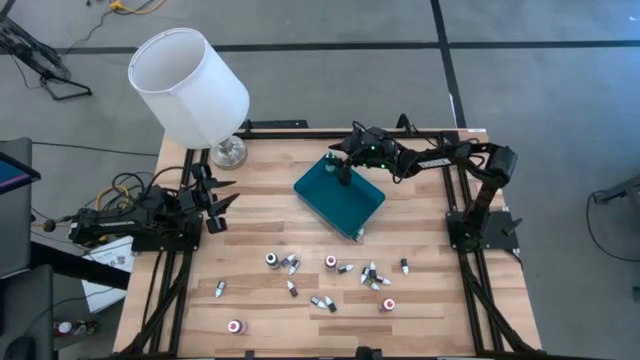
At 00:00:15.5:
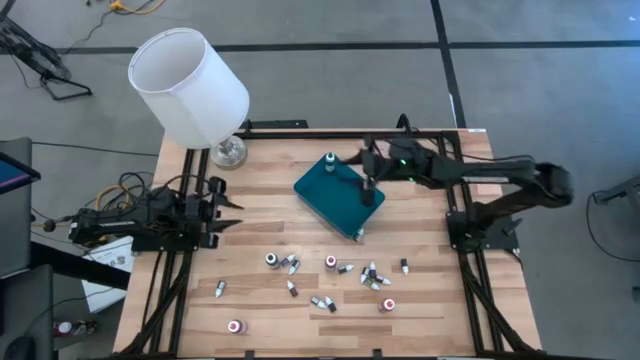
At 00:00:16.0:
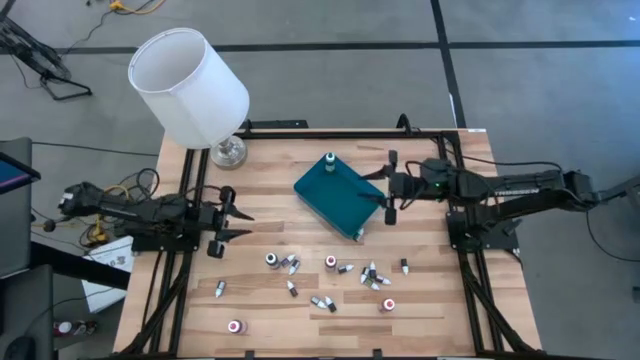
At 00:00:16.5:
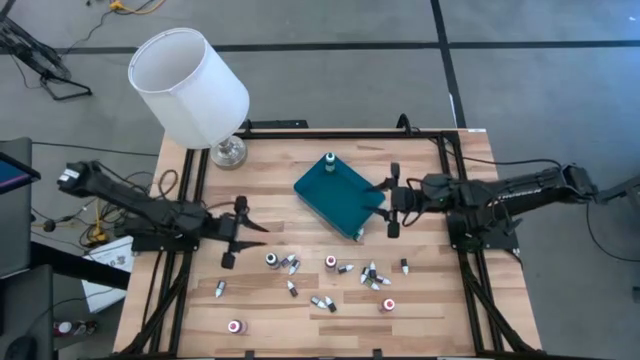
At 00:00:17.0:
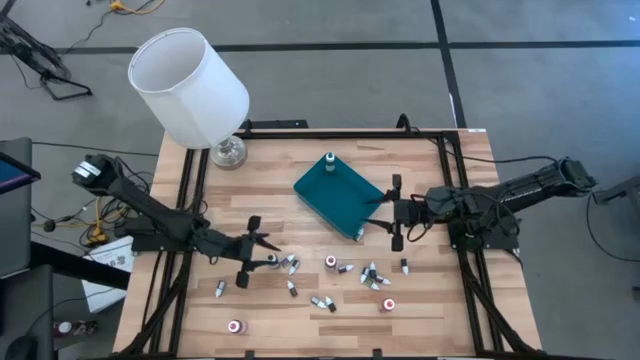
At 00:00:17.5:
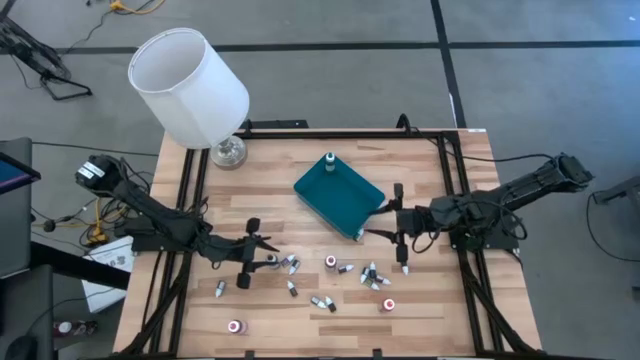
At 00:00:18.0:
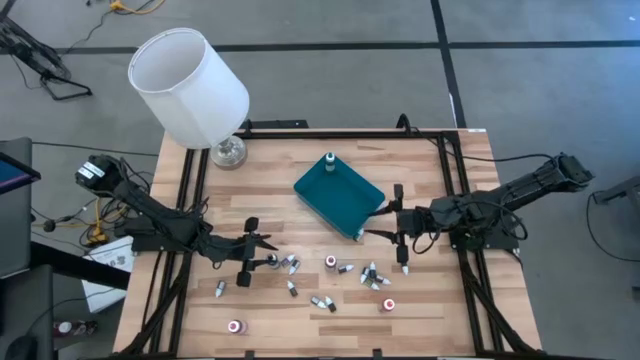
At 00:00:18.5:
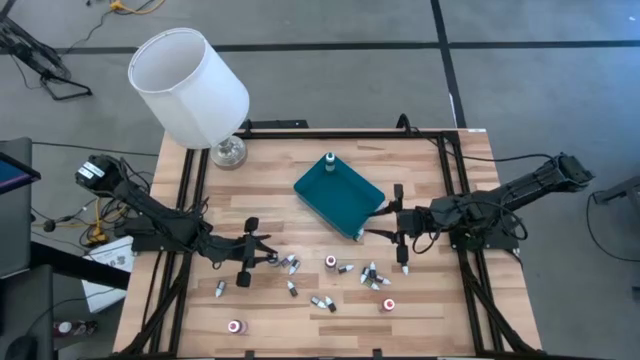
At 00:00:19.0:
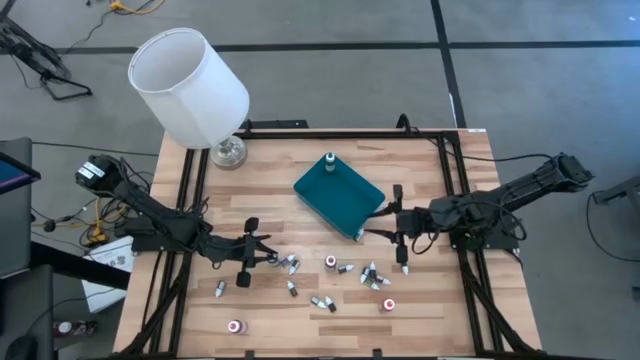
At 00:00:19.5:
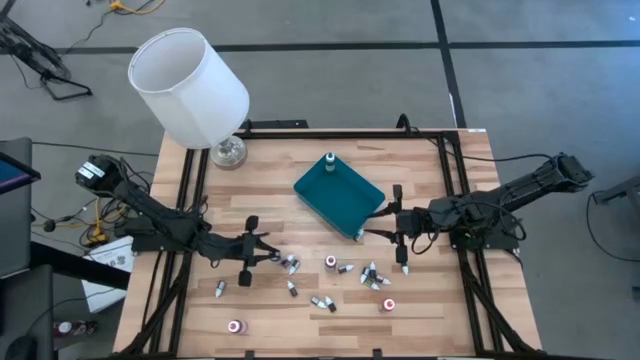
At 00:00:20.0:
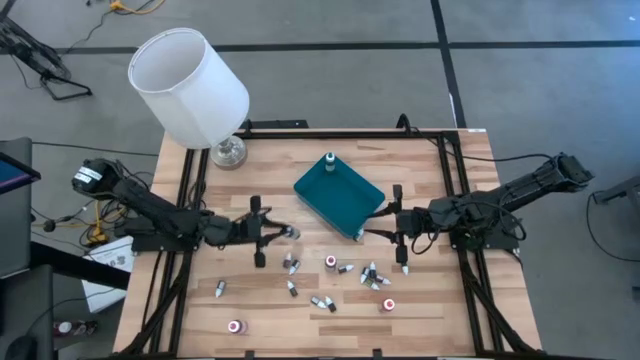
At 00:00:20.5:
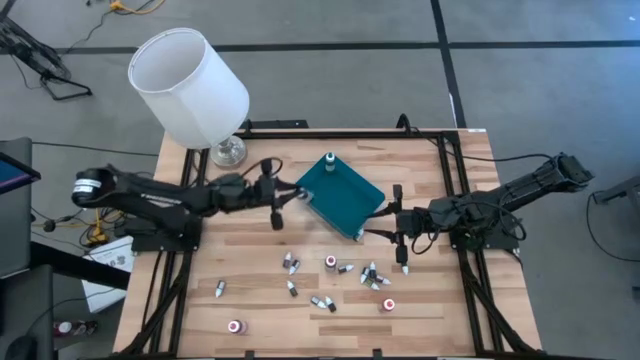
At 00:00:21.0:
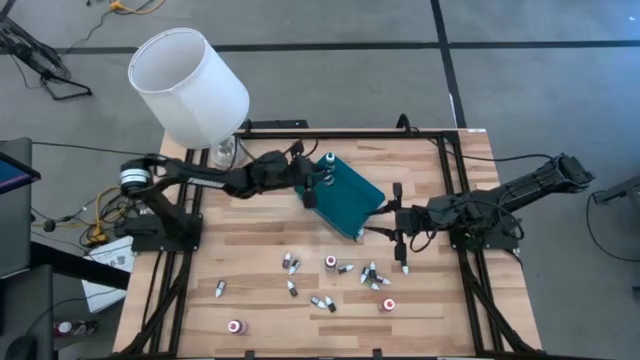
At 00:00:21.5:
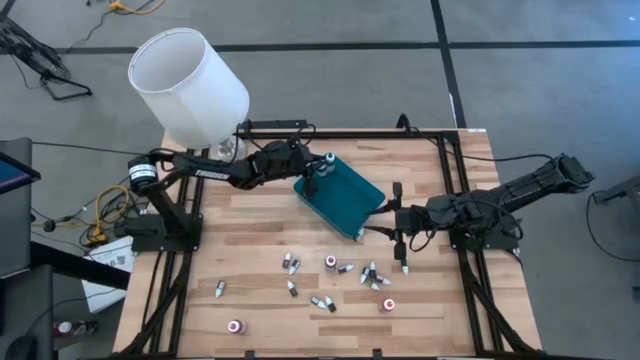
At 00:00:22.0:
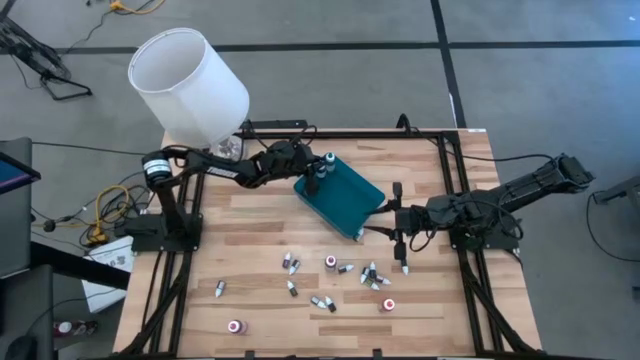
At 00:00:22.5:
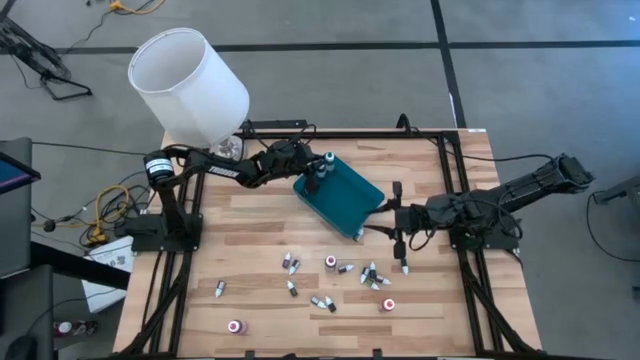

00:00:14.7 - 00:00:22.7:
Task: Pick & Place food coloring
Put the large black food coloring bottle into the blue bin

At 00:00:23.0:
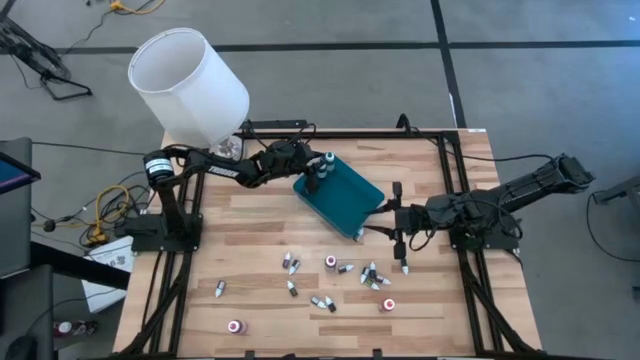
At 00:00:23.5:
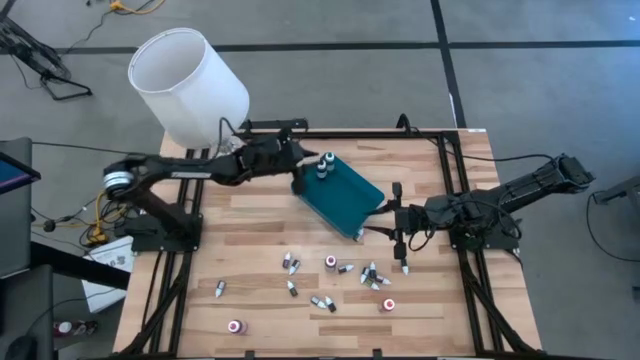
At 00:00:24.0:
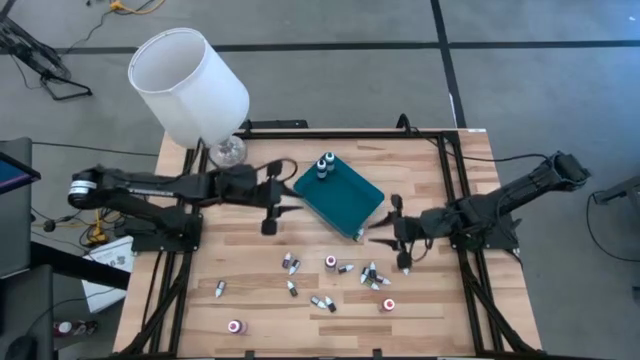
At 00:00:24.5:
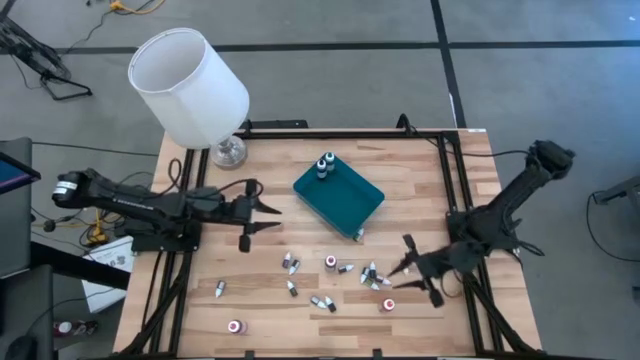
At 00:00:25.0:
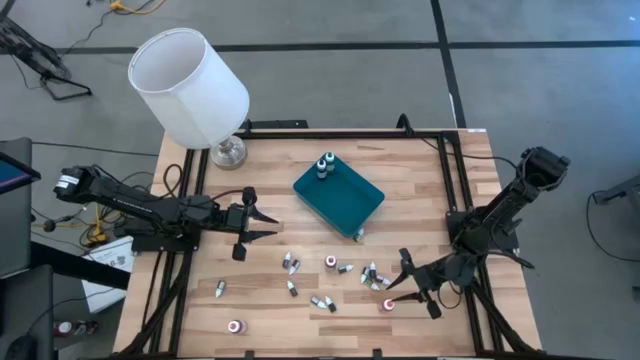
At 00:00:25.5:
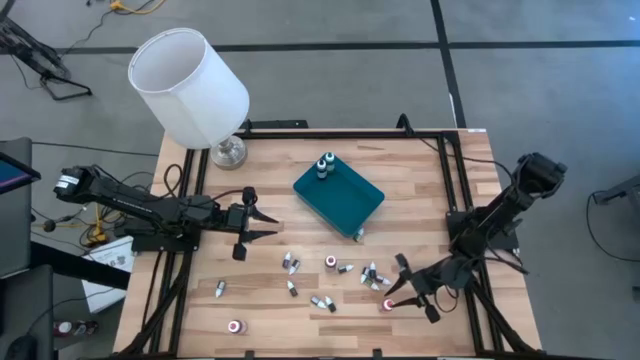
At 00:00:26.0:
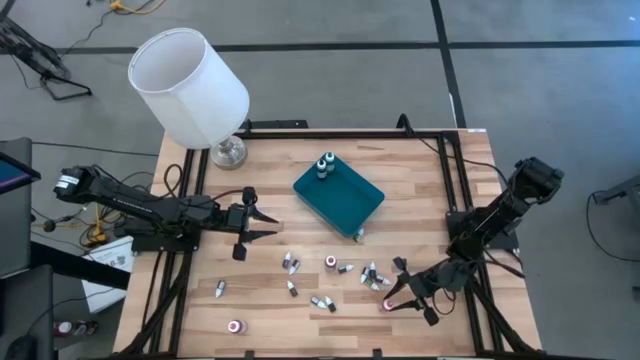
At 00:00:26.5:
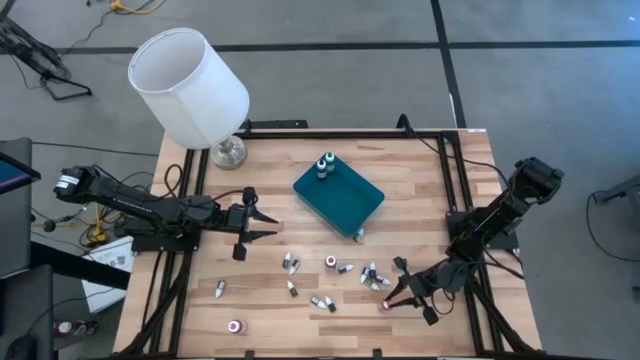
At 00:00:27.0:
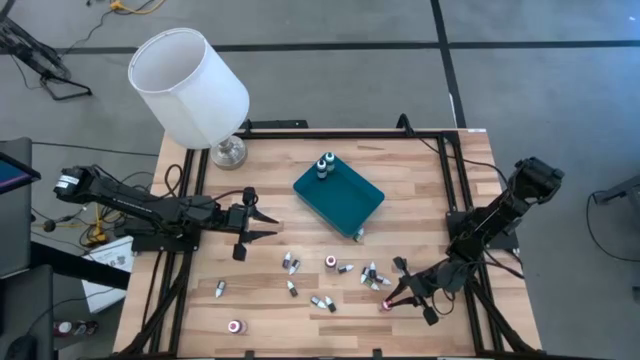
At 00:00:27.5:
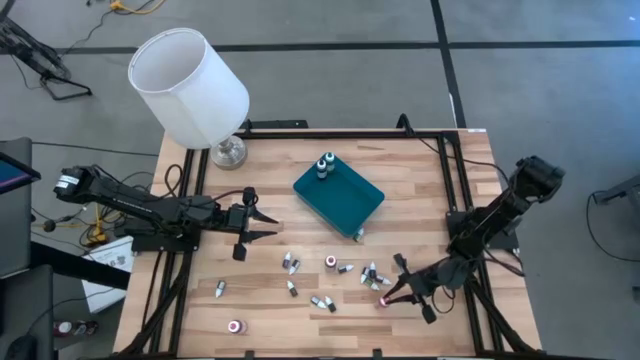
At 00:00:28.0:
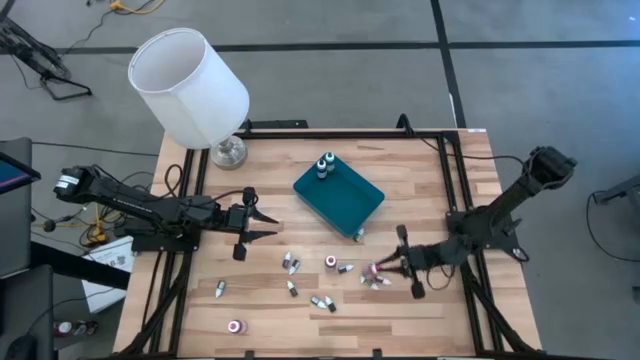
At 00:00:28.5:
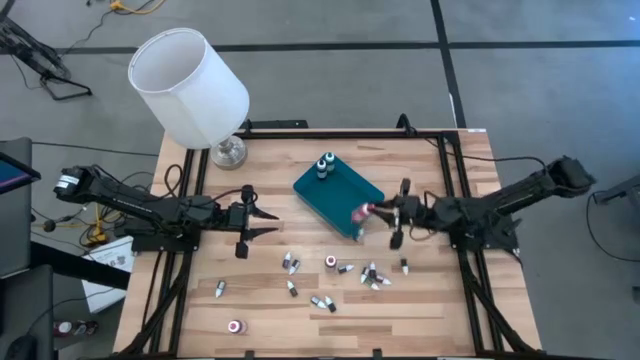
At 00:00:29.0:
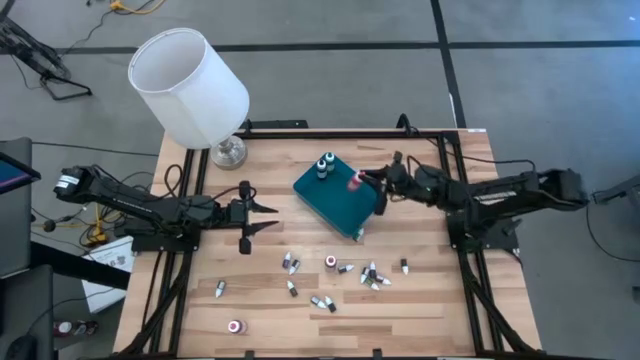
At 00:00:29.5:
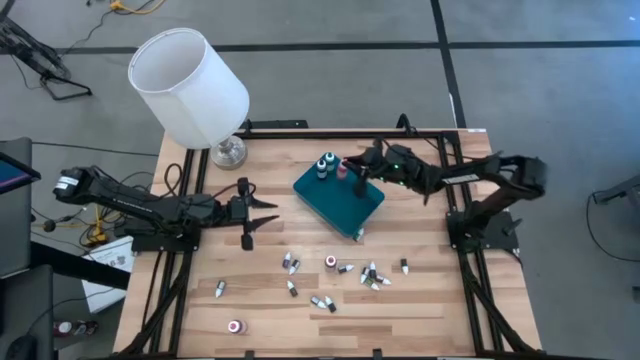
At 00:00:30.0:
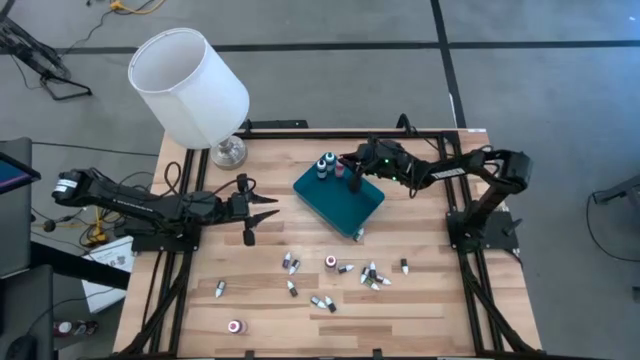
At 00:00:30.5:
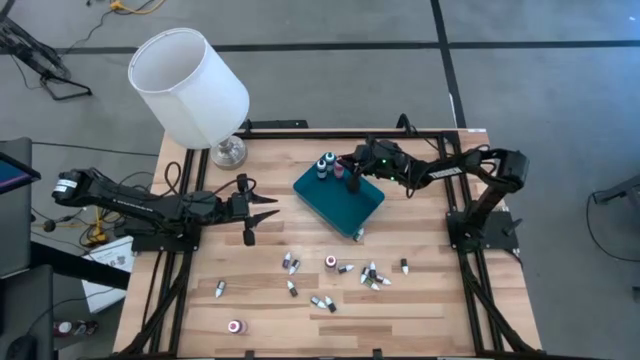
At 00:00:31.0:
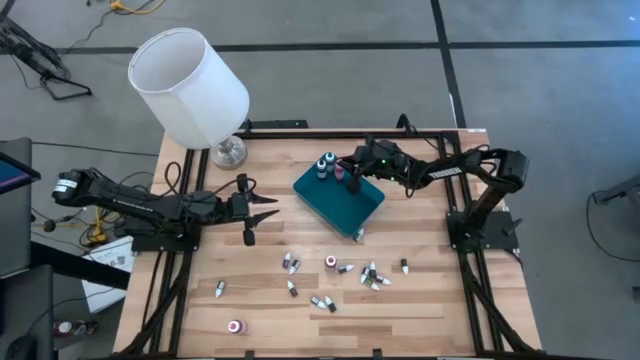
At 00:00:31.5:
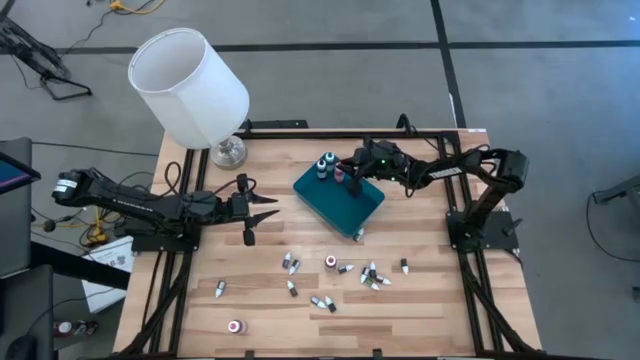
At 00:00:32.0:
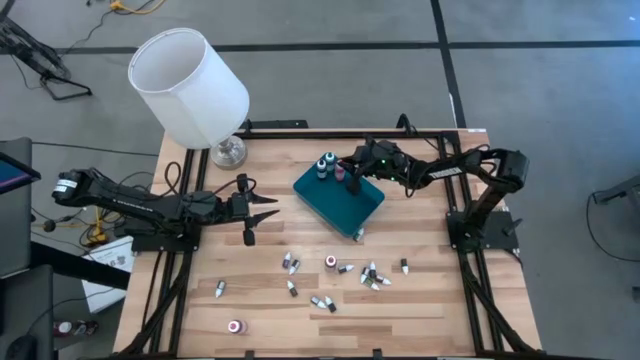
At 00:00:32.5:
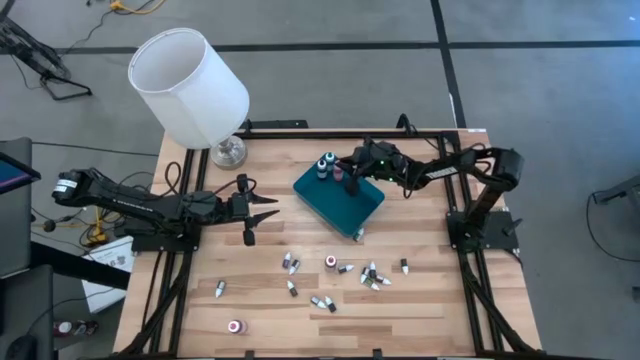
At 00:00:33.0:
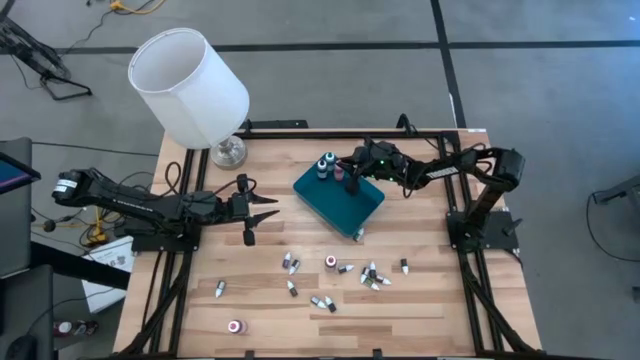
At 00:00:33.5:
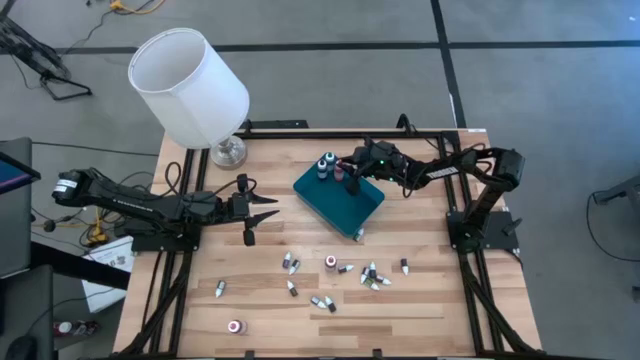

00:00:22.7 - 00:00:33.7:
Put the large orange food coloring bottle into the blue bin

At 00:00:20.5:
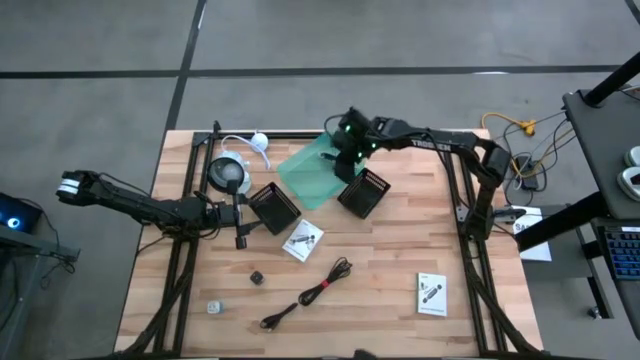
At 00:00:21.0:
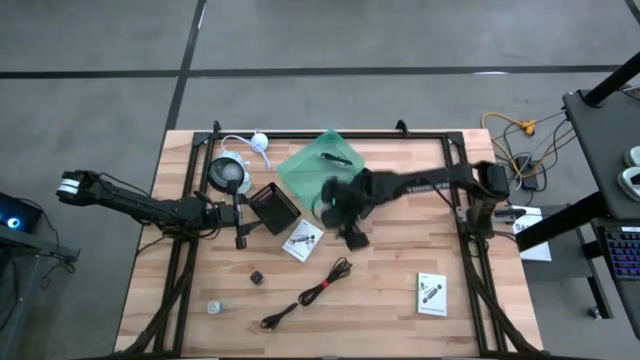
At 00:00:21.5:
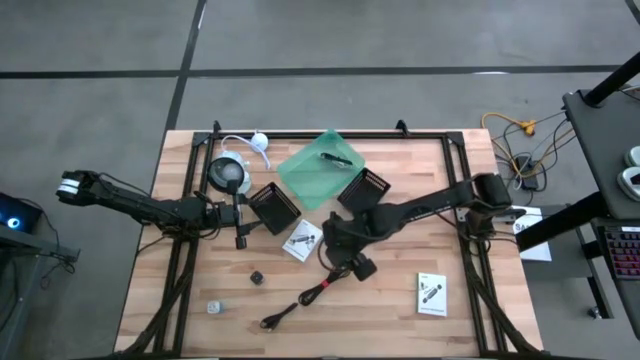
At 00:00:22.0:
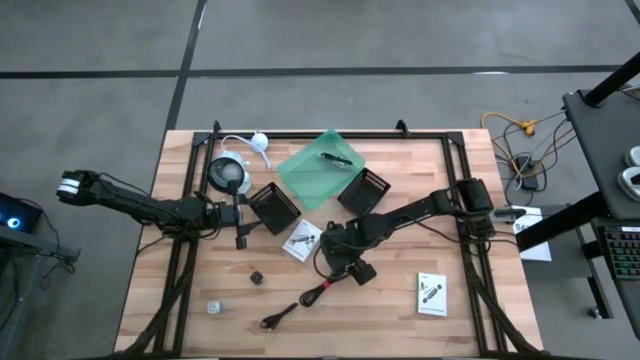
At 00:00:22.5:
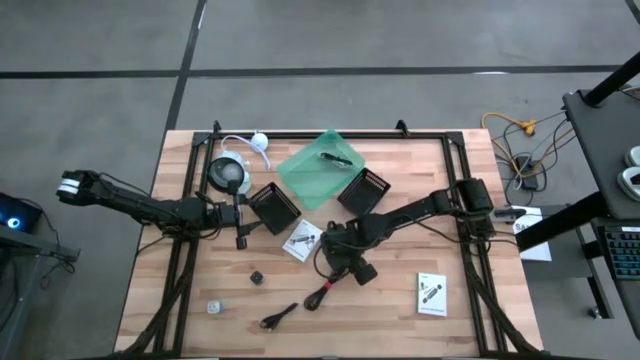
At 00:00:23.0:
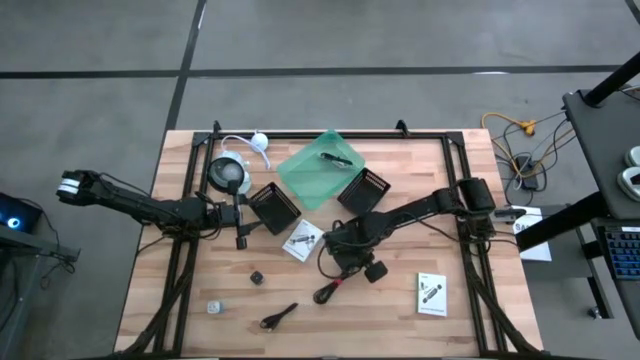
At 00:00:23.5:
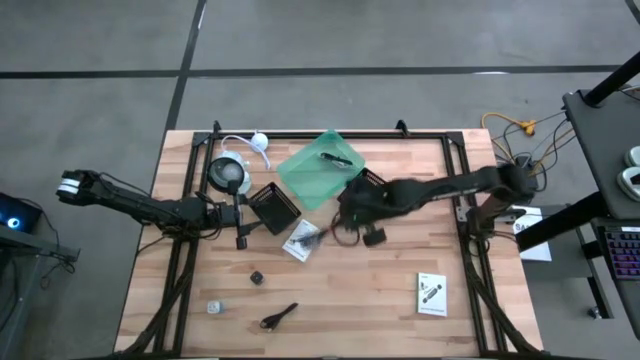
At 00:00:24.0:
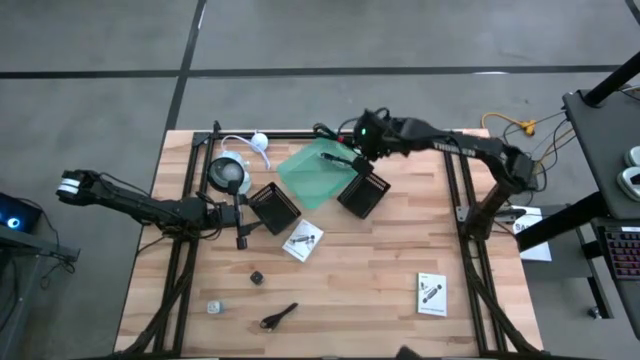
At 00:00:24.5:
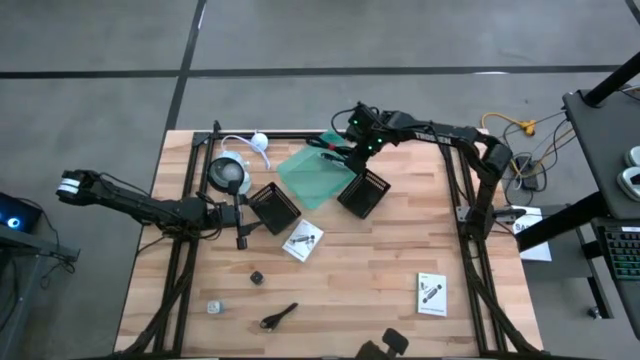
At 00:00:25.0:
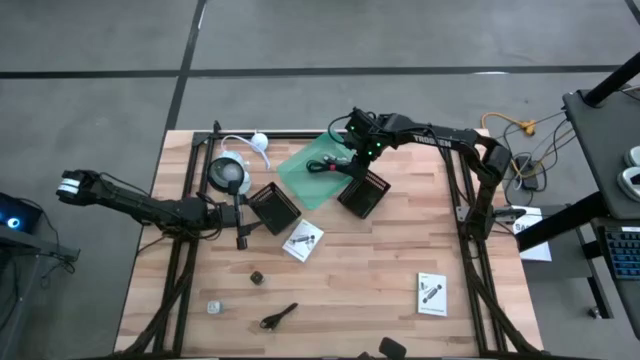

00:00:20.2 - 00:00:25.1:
Task: Pick and place items into bin
Put the top black charger cable into the green bin
